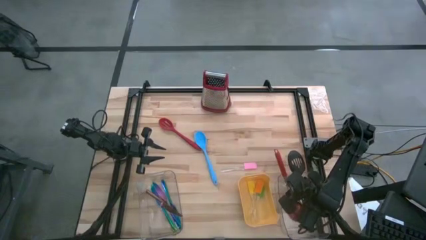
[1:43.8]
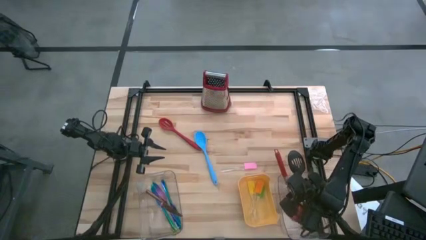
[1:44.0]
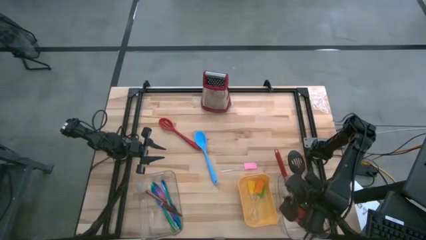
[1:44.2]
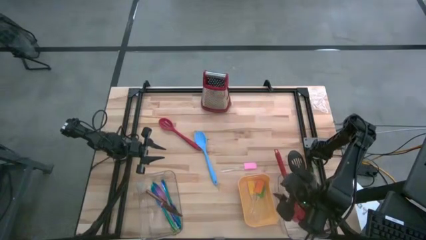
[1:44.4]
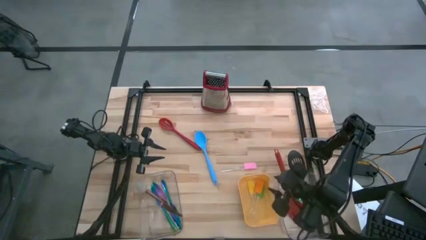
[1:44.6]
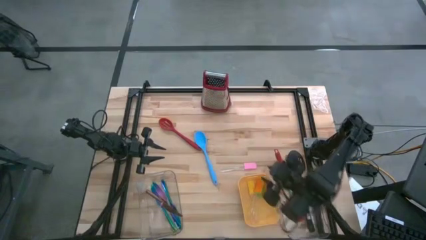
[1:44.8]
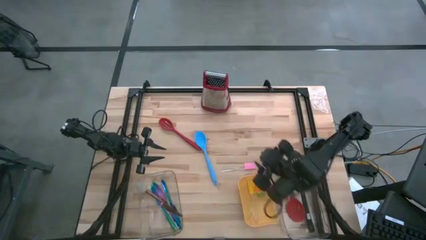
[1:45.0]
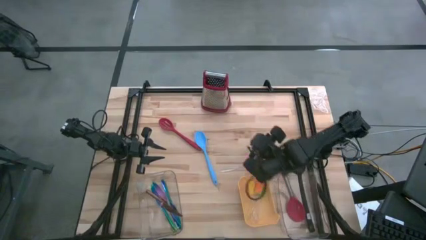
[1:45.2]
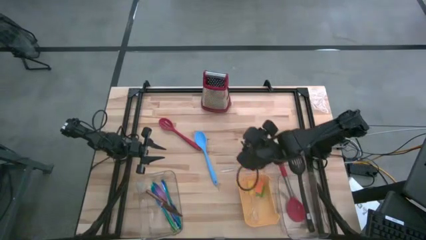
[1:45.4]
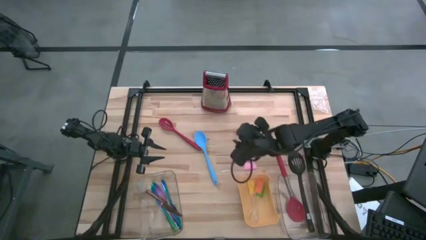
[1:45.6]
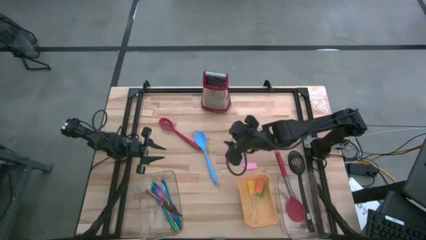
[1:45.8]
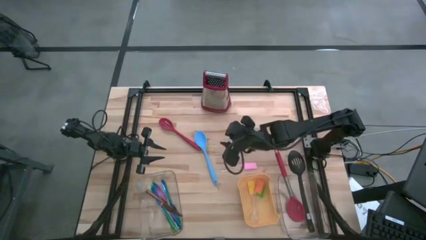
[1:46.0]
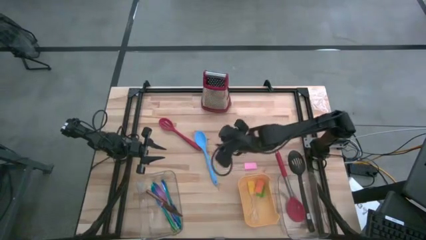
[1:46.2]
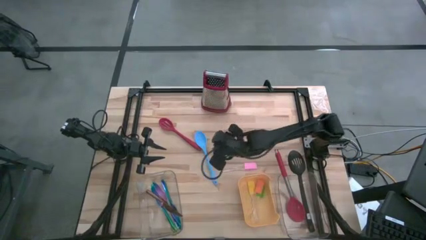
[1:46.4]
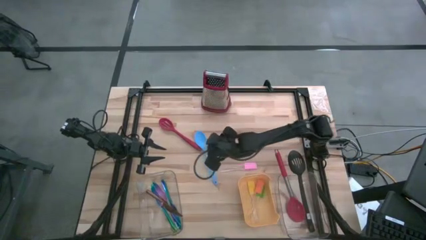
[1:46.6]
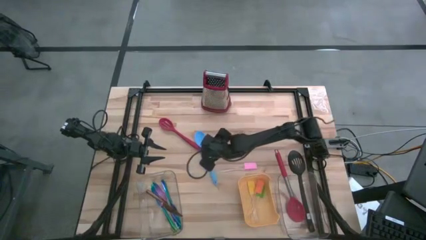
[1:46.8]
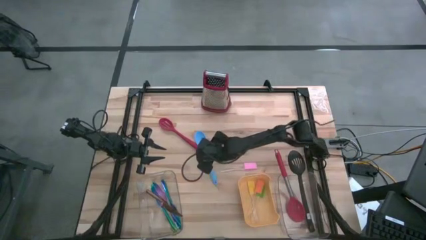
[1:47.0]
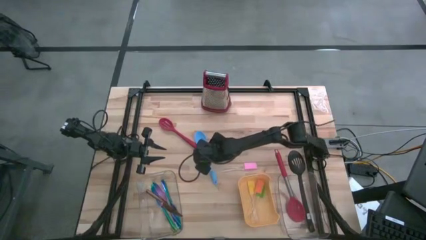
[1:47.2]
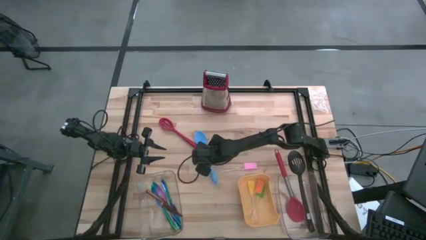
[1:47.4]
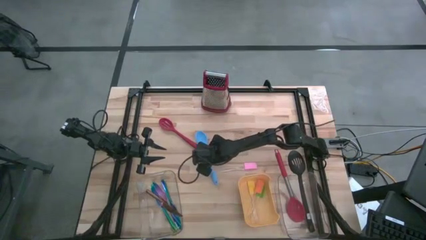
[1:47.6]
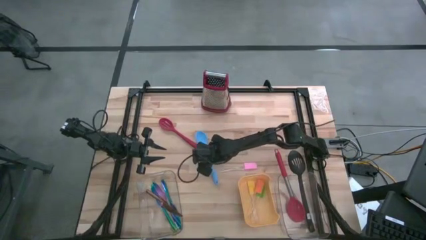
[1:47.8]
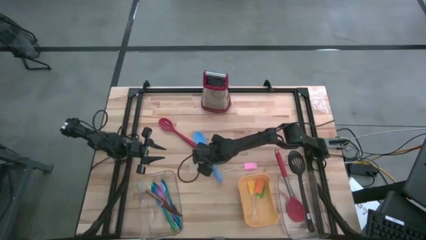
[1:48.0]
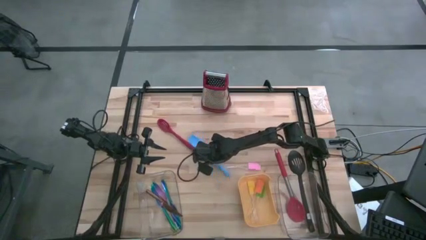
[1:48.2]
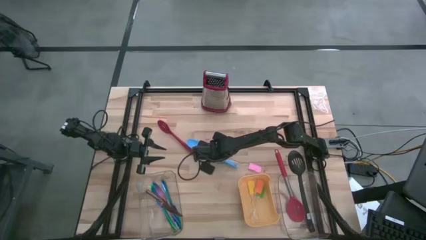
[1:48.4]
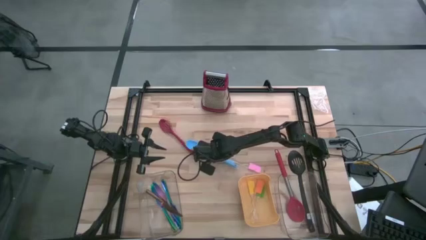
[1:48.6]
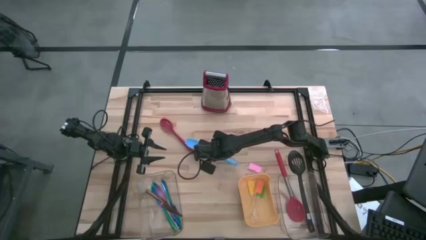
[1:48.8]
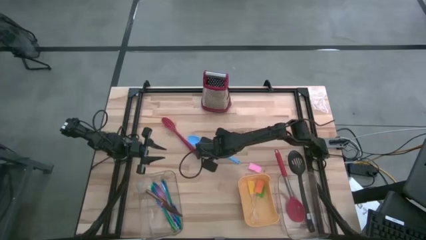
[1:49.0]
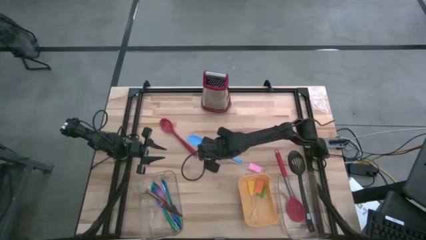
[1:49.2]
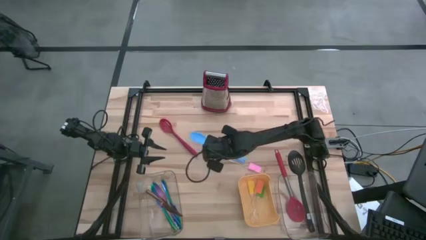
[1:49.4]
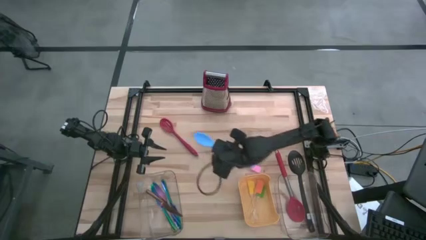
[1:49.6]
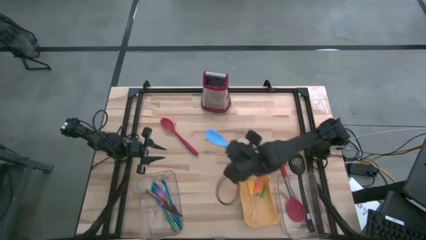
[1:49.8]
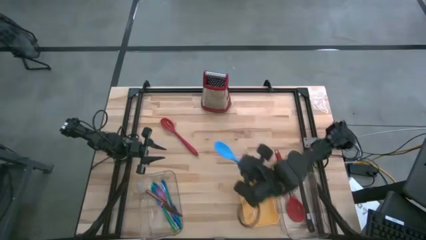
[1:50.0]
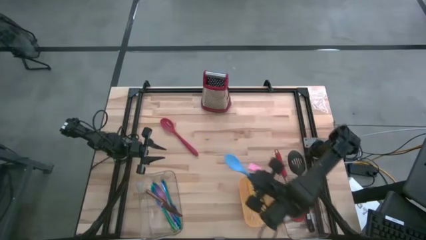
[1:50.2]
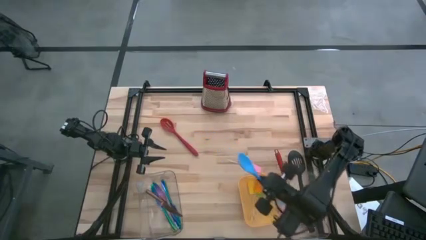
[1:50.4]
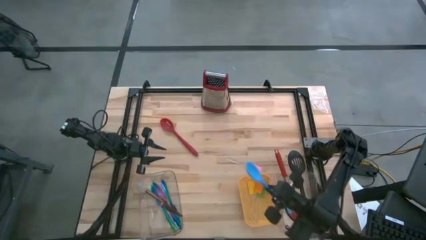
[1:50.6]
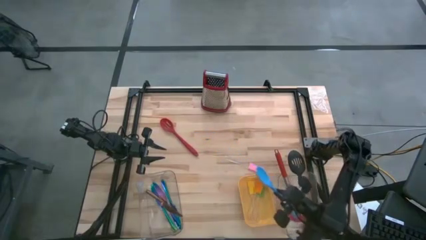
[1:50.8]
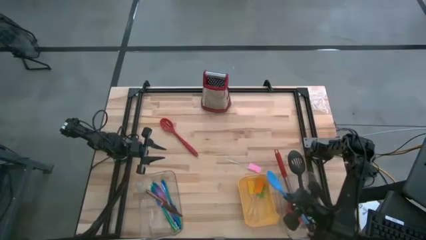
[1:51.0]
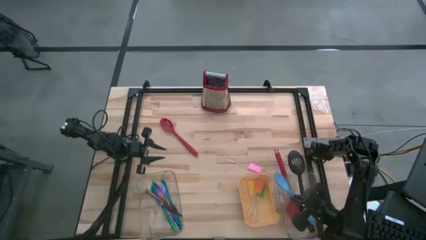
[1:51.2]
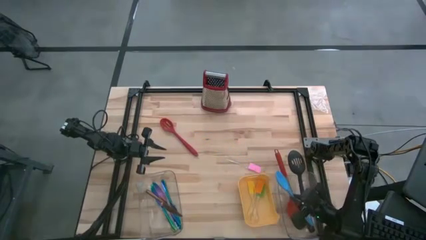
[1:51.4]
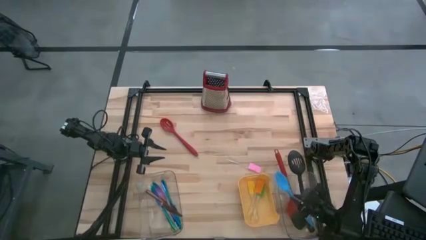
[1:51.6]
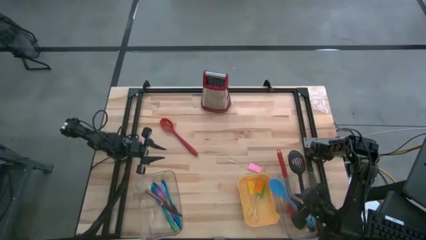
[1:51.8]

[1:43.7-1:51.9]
Task: Pick & Place Kitchen Items
Put the light blue serving spoon into the right transparent bin

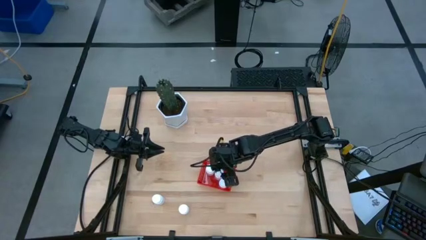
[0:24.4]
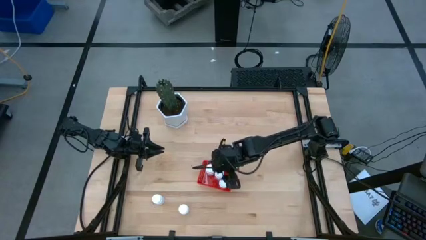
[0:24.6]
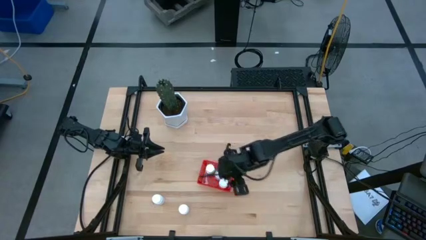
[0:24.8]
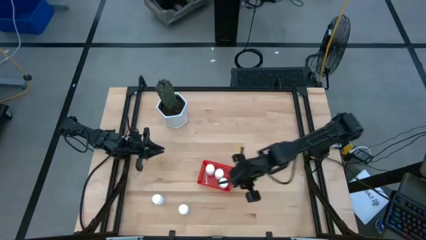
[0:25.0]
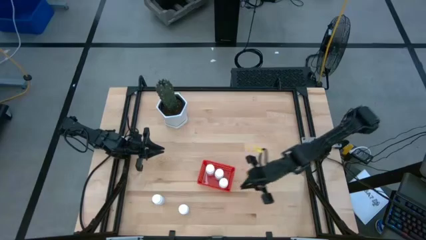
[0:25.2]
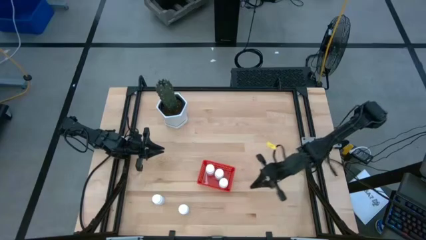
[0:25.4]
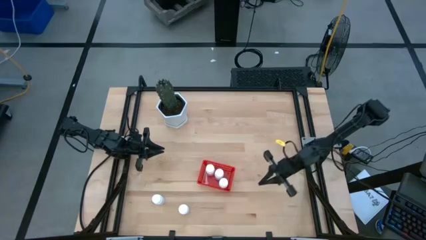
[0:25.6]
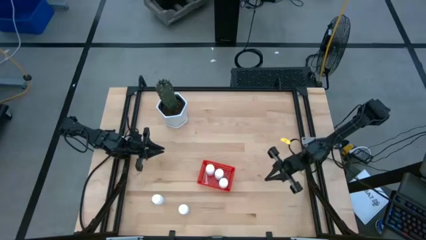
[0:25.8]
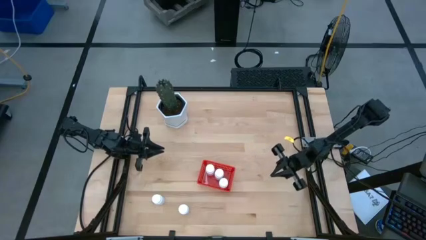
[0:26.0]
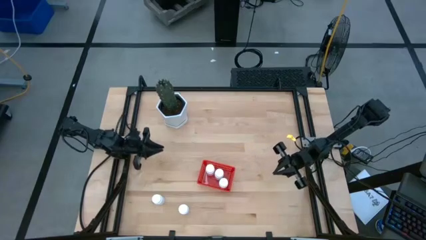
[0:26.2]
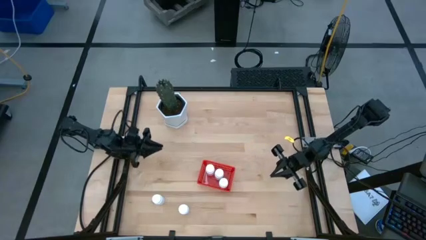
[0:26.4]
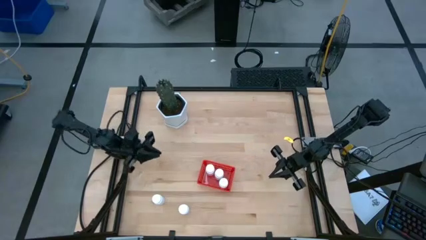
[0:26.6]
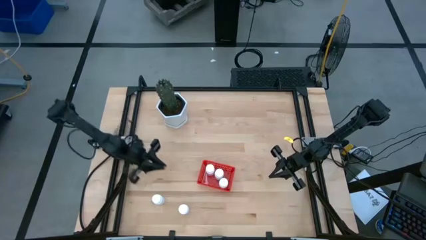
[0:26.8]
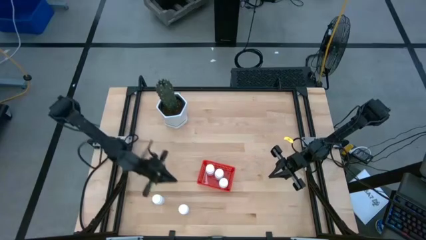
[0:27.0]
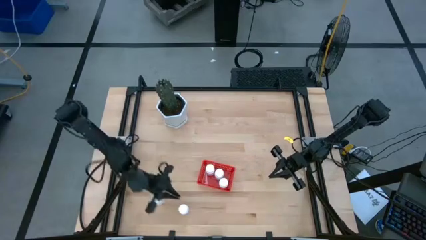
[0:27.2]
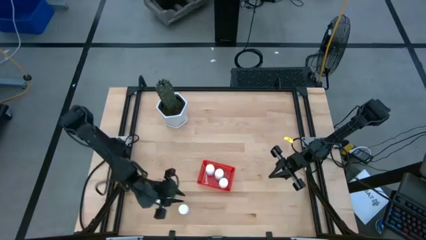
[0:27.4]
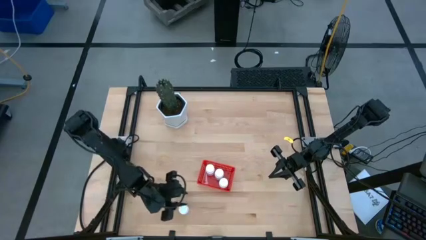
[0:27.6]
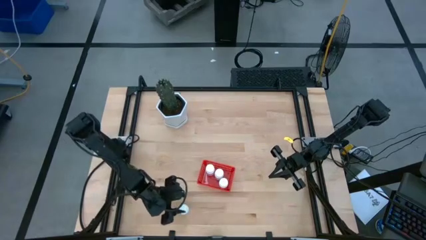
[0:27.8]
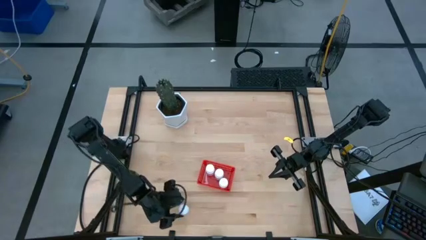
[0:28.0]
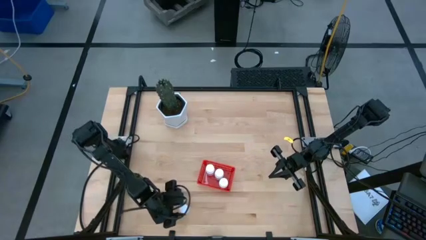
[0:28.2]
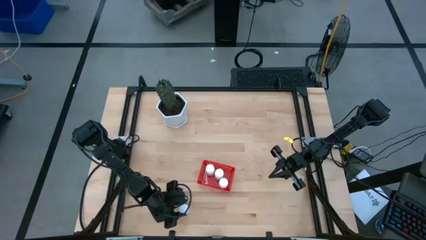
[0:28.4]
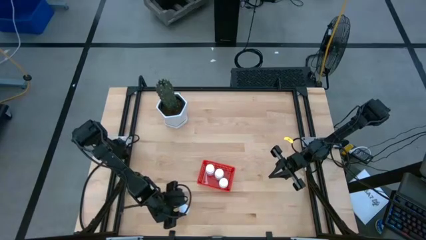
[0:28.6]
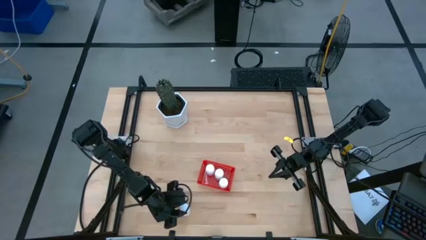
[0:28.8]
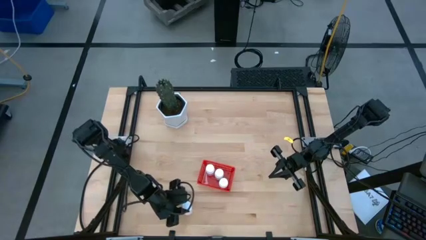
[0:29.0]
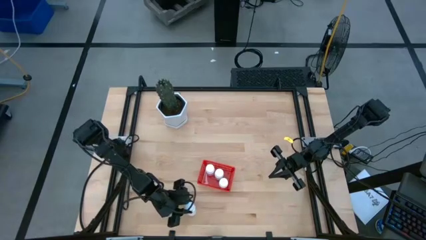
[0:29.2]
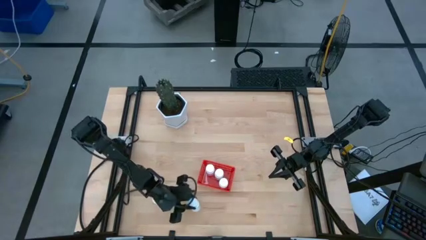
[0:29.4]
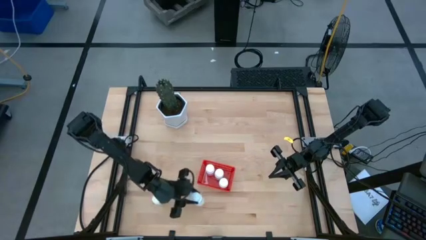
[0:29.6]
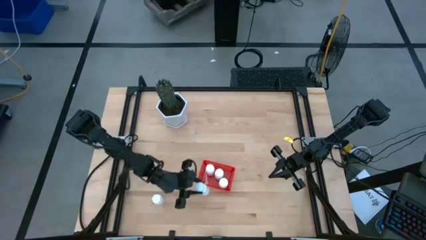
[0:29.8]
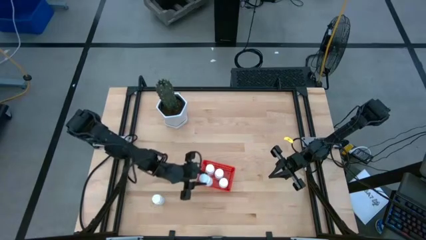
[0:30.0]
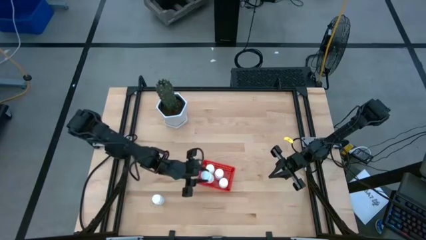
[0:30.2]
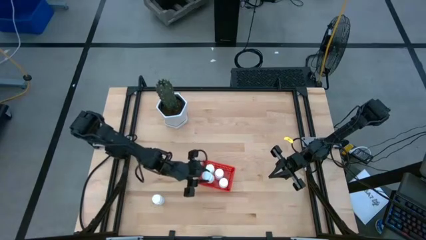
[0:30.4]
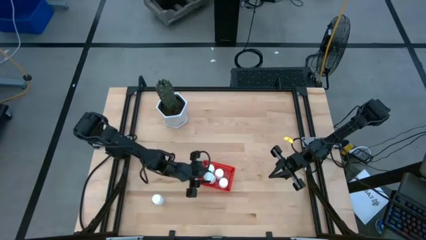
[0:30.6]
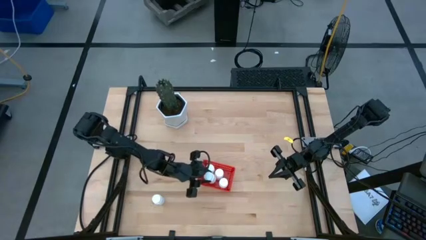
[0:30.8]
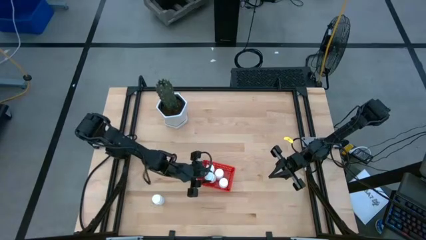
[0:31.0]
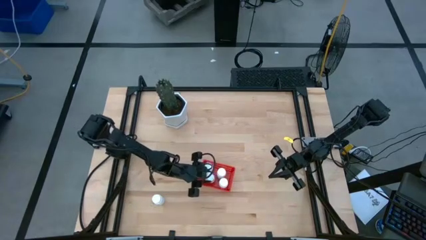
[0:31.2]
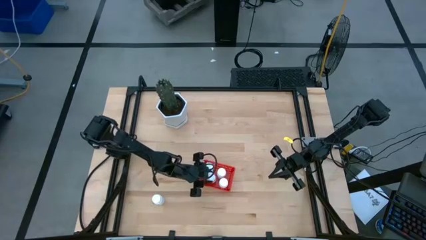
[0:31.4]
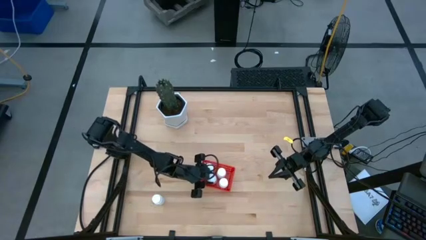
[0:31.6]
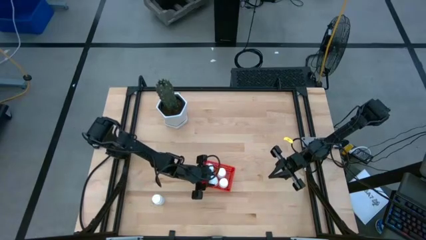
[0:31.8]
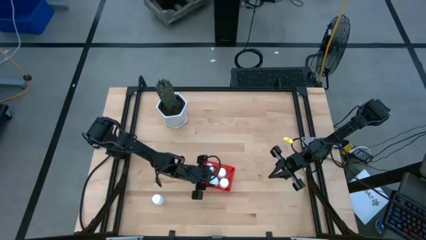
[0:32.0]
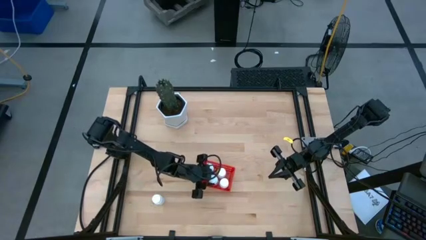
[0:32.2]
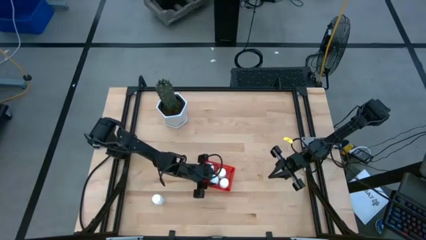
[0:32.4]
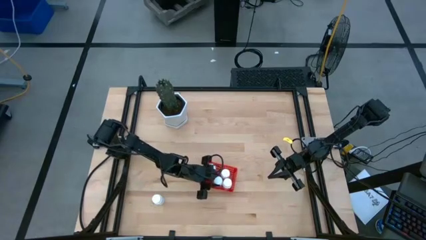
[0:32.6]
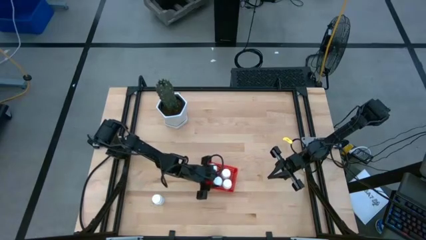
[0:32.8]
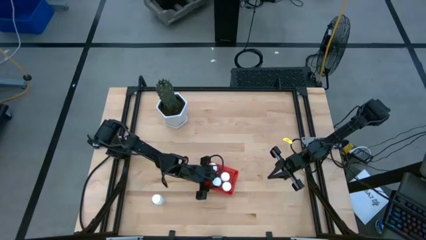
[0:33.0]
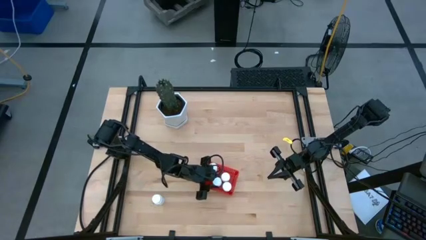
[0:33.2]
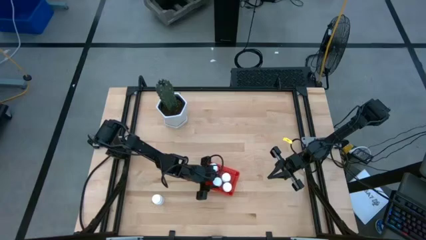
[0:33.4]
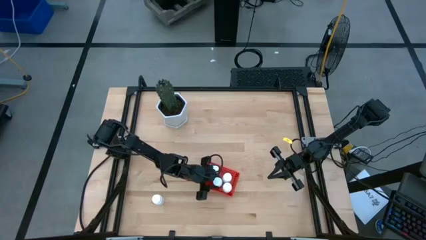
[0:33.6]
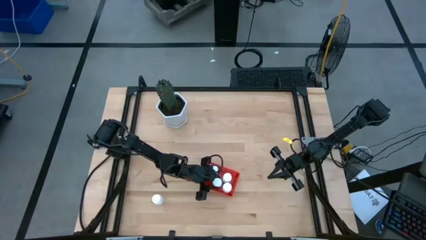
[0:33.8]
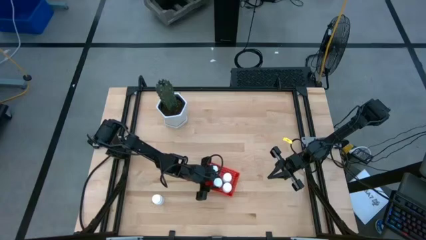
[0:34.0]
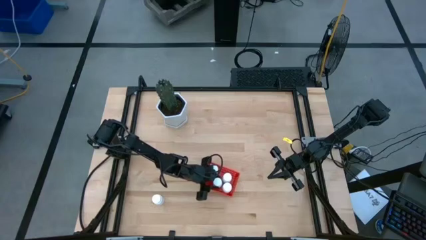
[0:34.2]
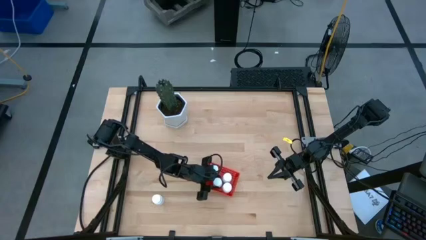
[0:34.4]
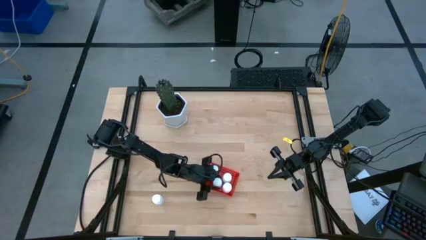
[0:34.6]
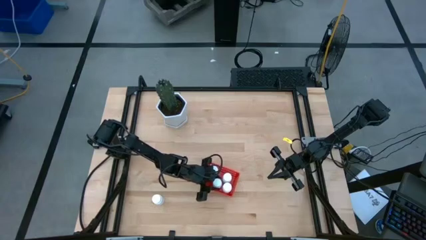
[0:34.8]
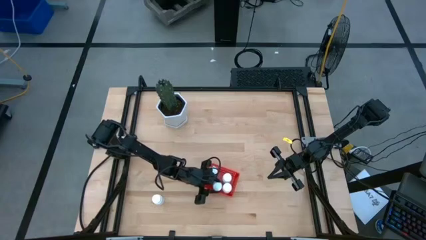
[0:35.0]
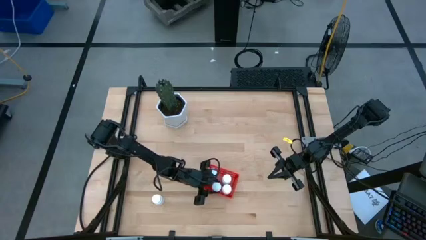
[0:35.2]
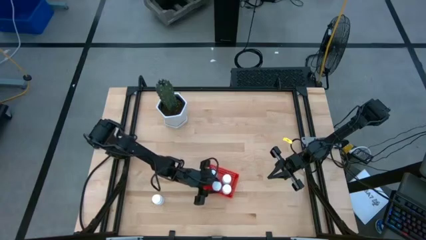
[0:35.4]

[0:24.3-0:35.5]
Task: Pick and place pill bottles into a basket
Put the white pill bottle into the red bin
